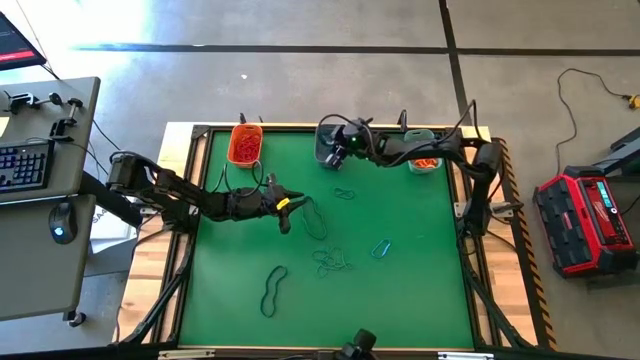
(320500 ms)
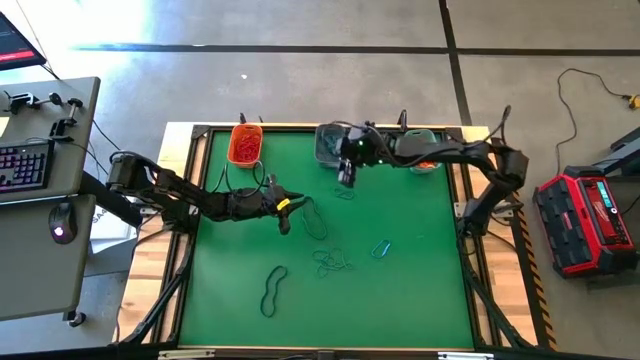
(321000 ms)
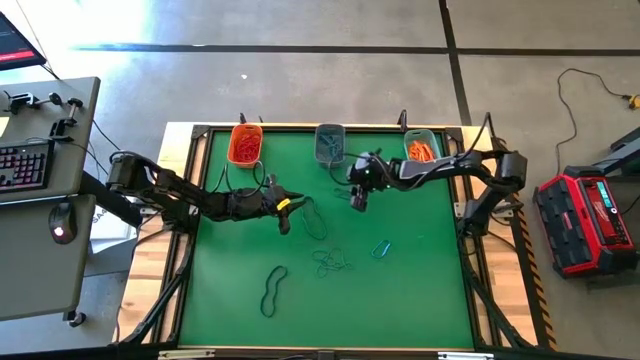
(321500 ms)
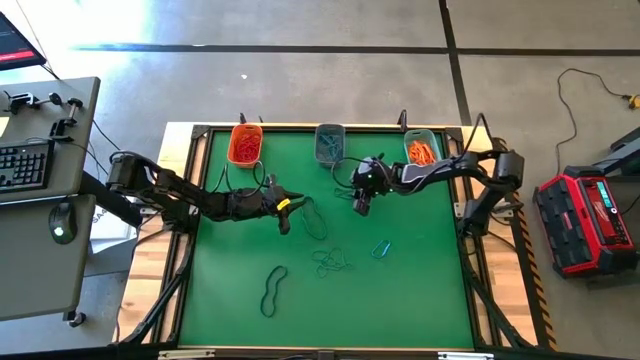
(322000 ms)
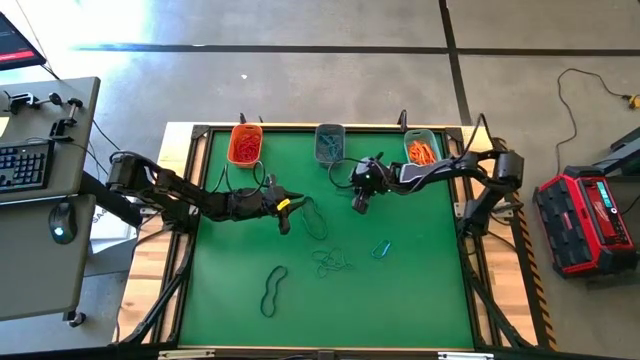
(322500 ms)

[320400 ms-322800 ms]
Task: Sort rubber bands into baskets
Put the blue rubber band into the blue bin

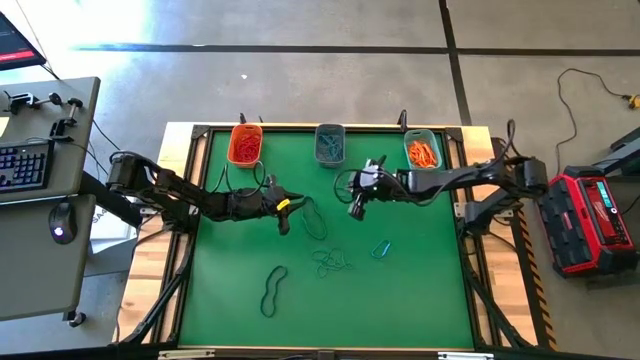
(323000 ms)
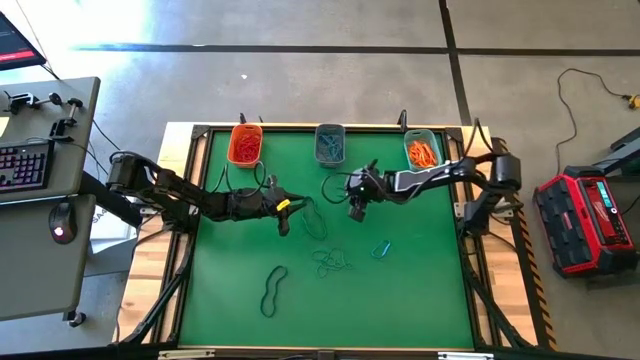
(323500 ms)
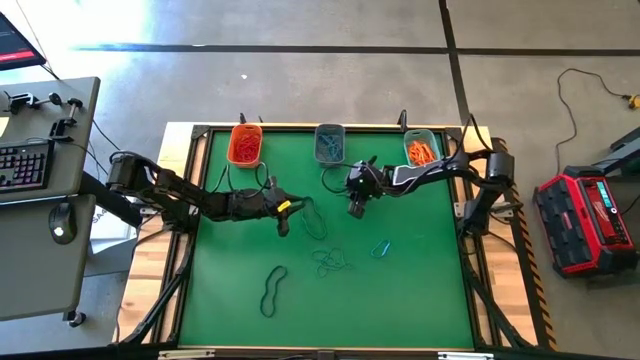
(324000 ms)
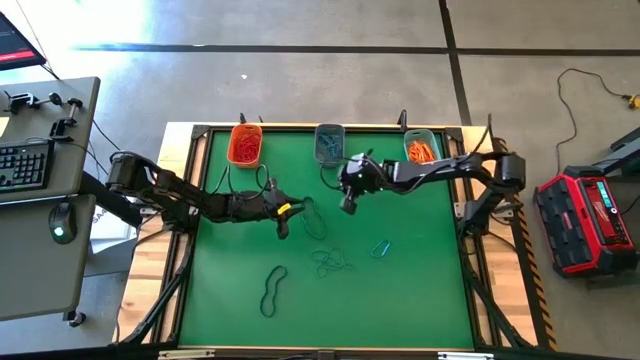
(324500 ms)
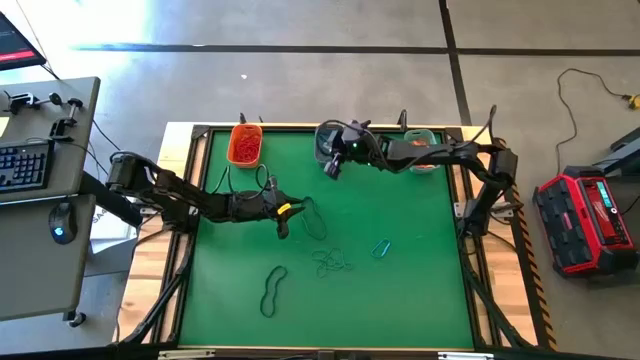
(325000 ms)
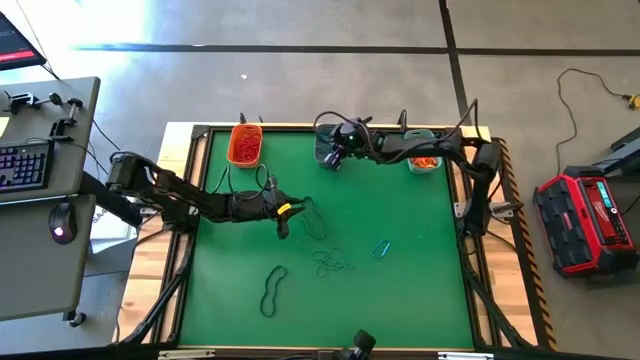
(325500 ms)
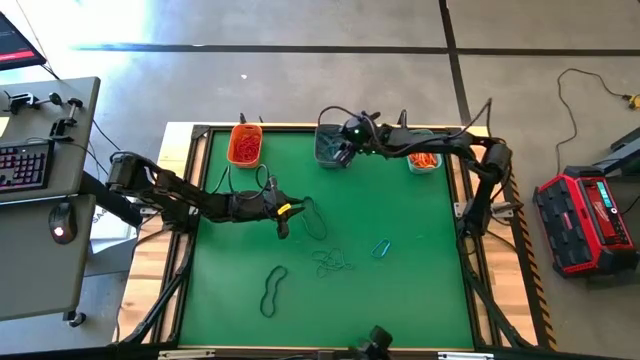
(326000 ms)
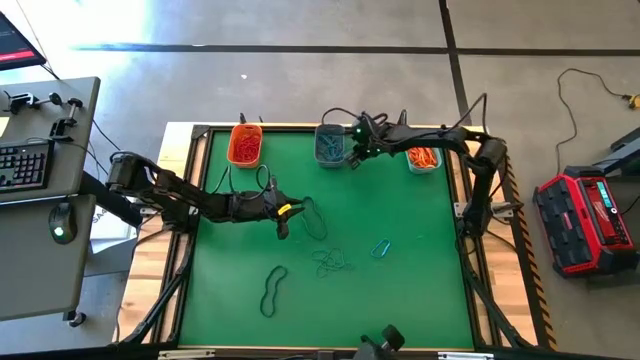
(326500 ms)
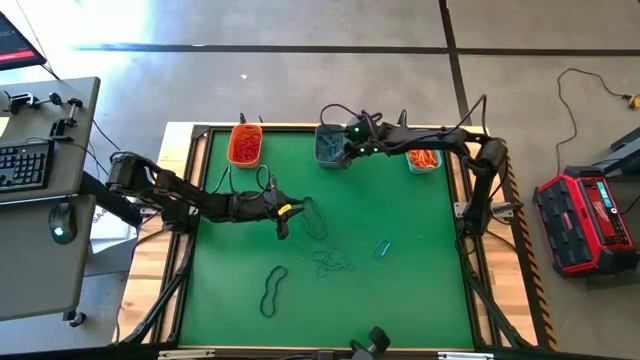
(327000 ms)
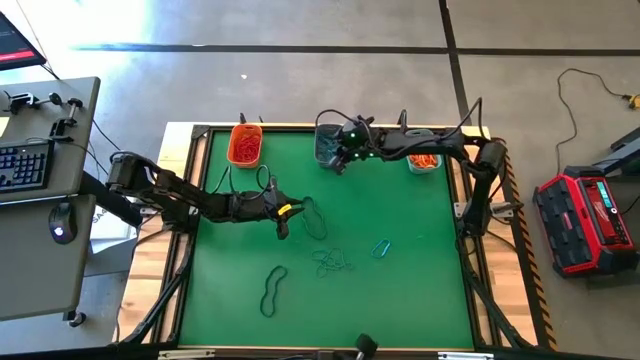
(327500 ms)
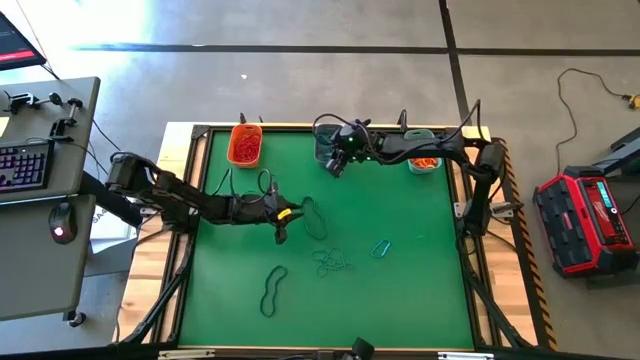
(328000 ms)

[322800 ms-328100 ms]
Put the blue rubber band into the blue bin

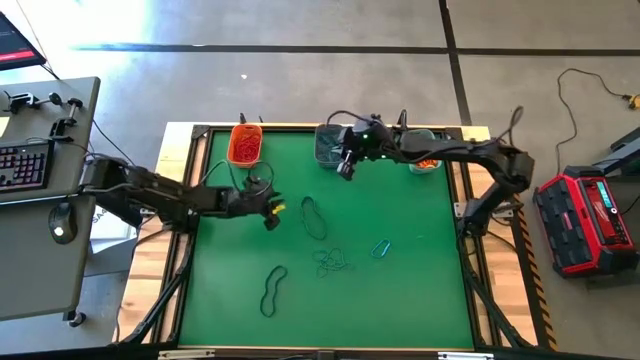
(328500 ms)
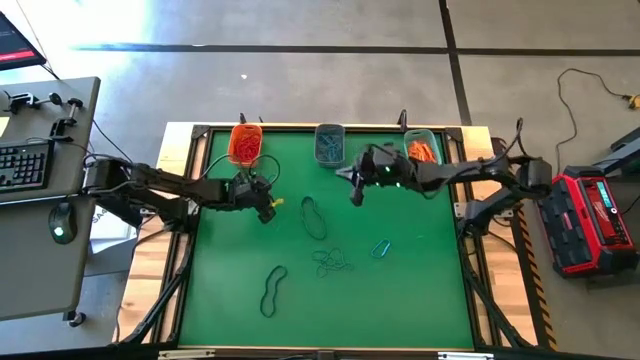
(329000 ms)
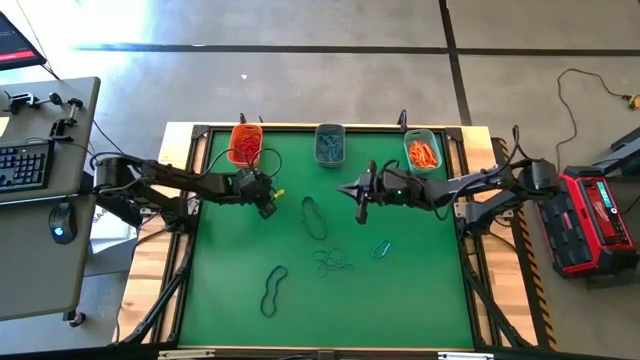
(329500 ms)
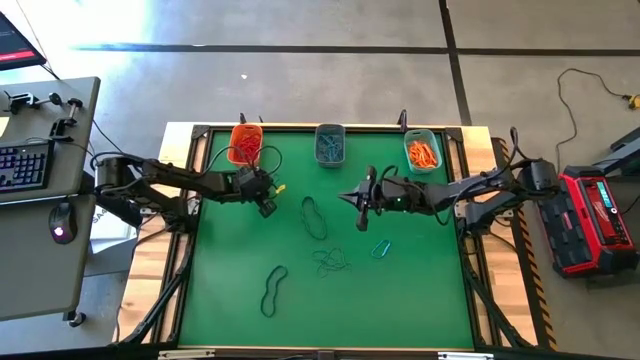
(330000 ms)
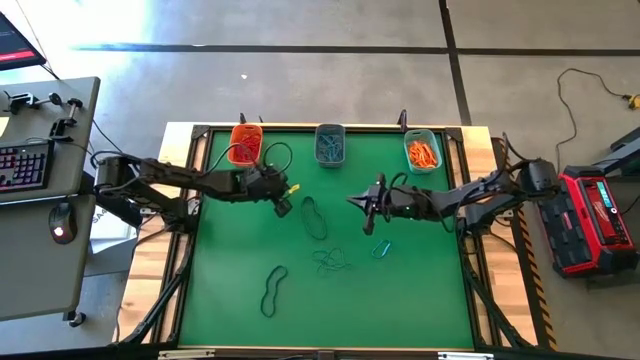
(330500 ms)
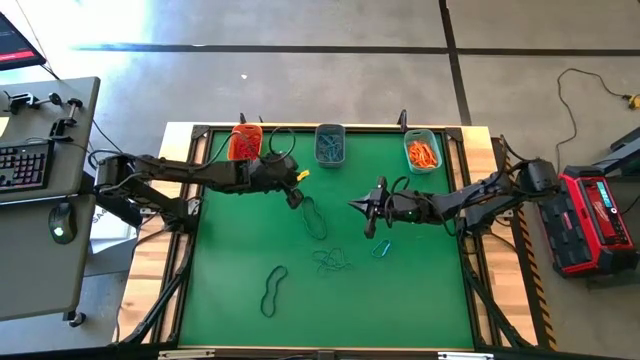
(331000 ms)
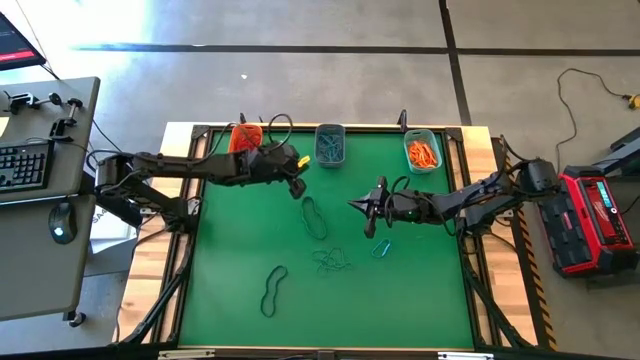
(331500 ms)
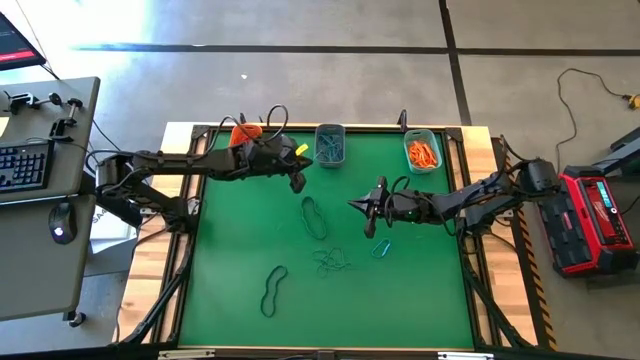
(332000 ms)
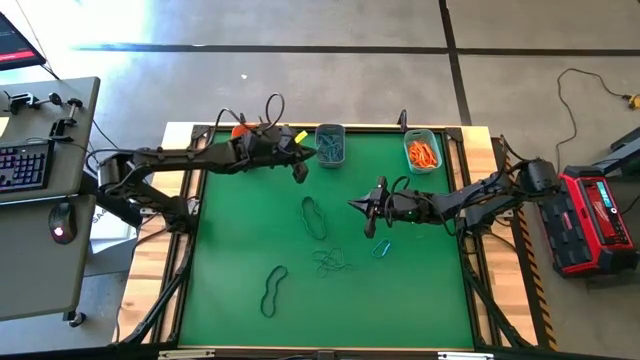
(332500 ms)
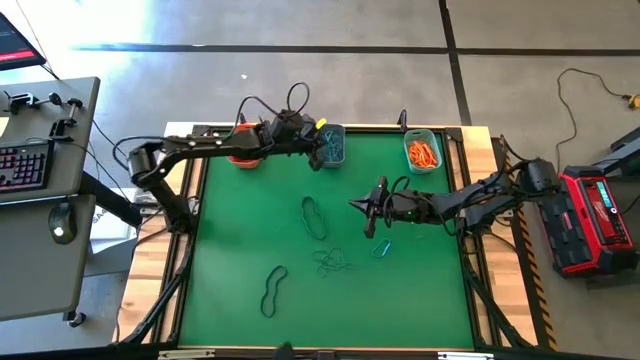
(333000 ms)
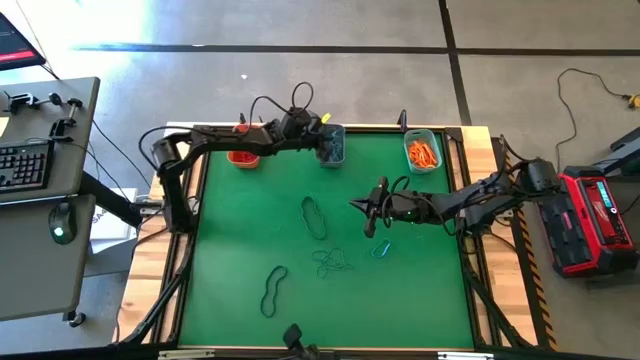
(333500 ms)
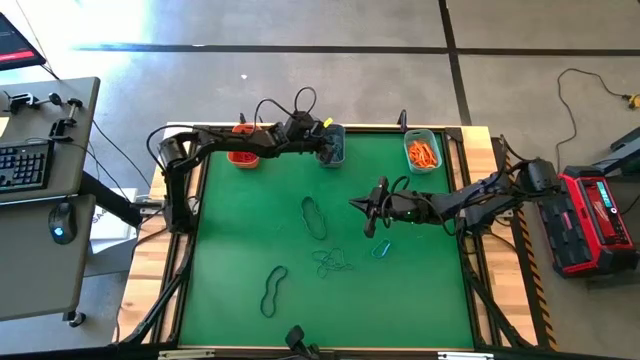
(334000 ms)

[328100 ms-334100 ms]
Put the blue rubber band into the blue bin

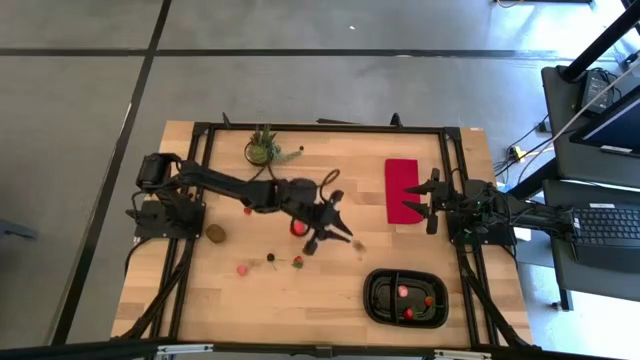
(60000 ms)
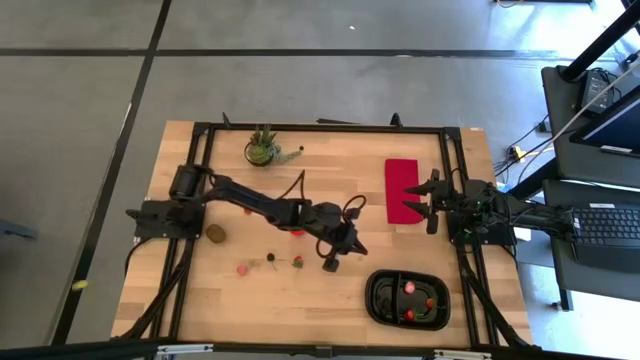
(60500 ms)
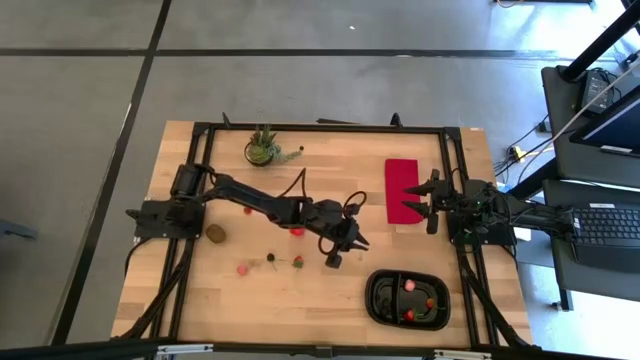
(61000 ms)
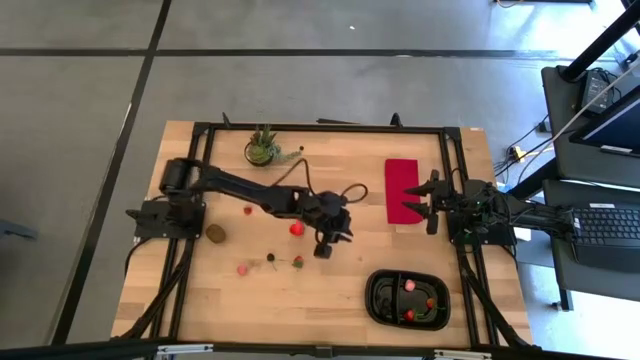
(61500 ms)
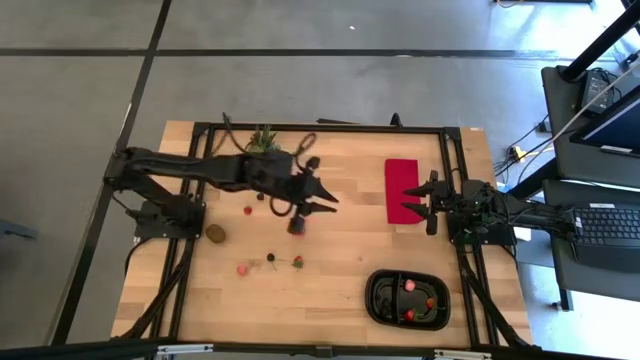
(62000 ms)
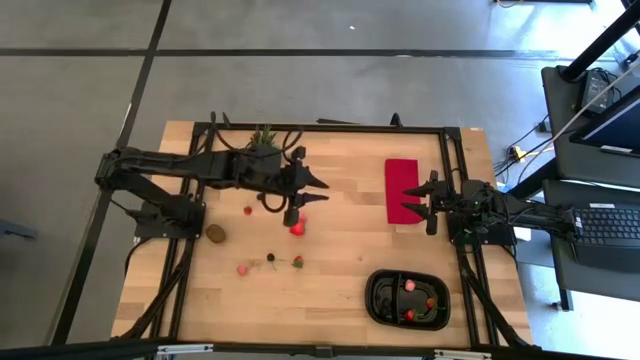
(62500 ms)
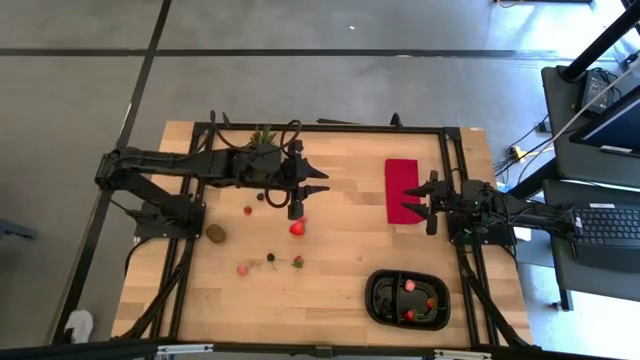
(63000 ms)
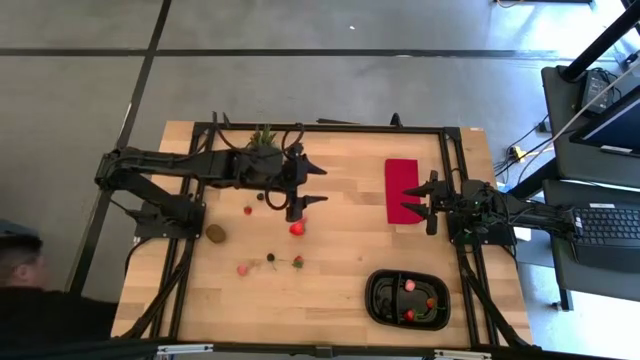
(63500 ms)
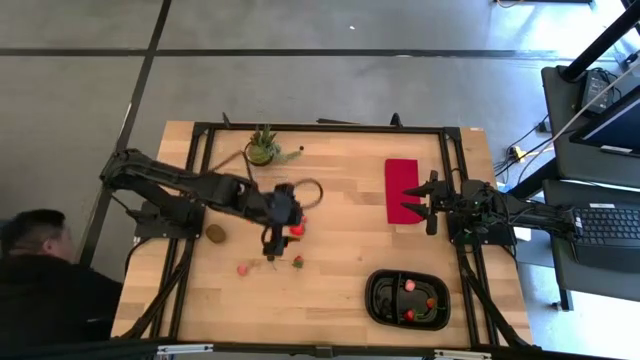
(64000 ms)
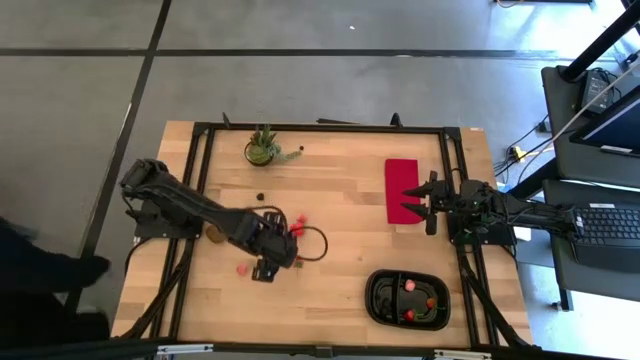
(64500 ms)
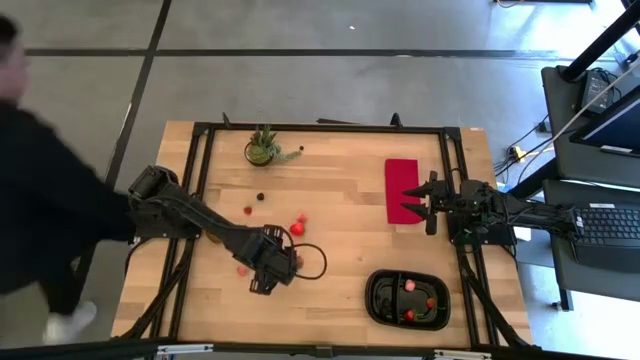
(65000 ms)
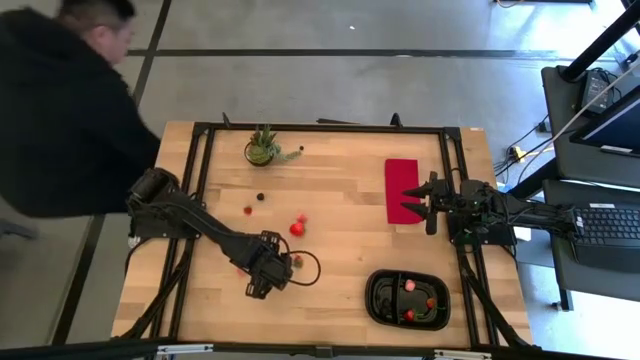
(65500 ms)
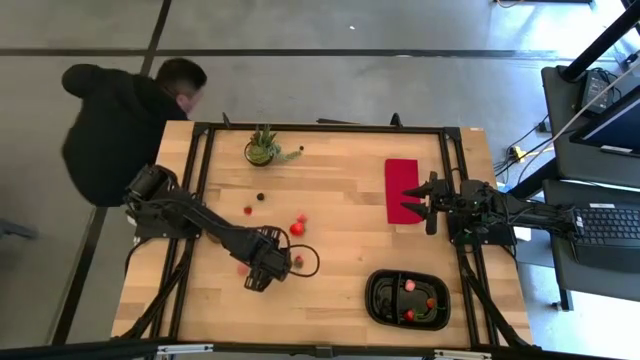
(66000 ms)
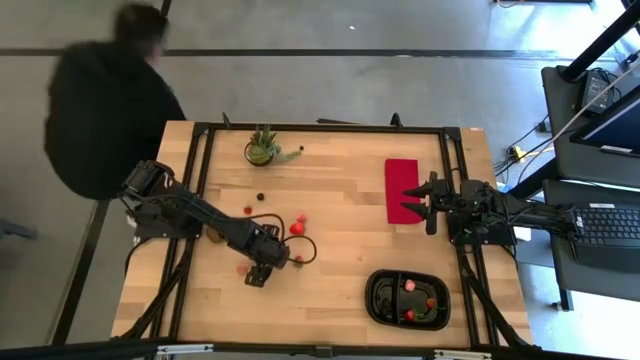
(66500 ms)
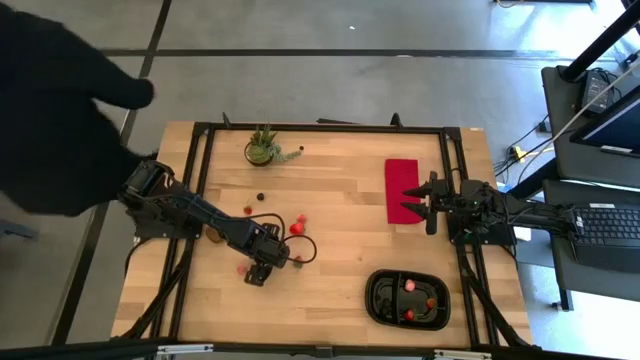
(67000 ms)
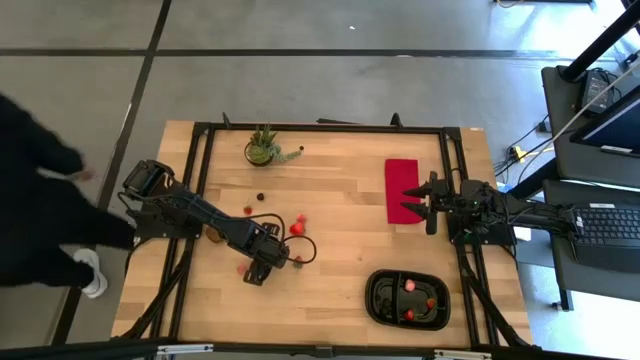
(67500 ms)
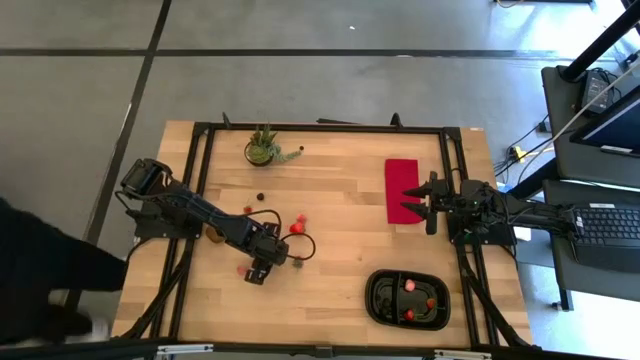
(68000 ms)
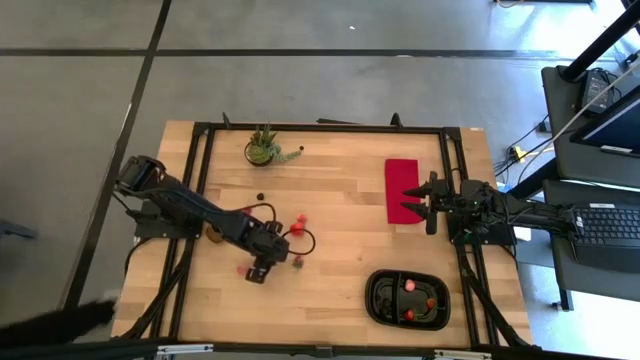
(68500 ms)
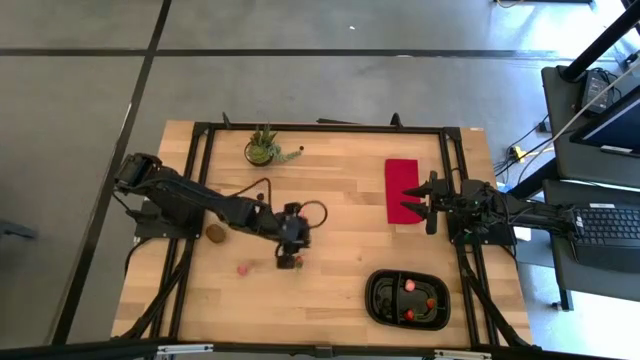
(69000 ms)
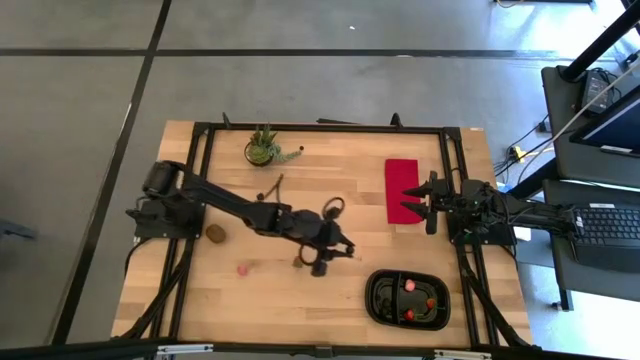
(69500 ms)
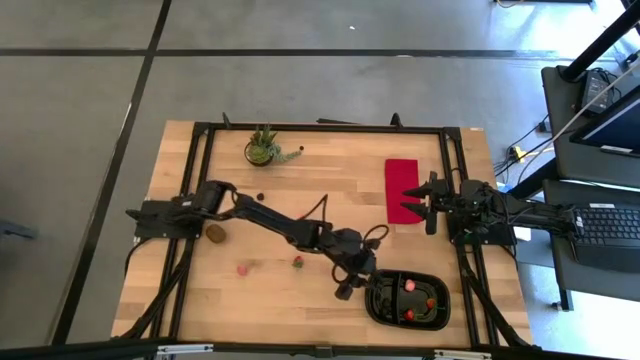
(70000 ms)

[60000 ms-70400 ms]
Task: Pick and placing Produce into tupperware
Put the cherry into the left of the black bin
